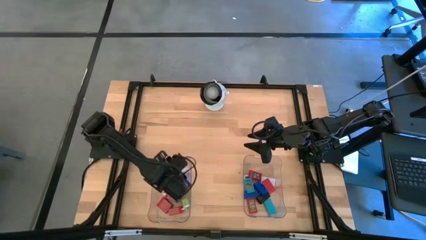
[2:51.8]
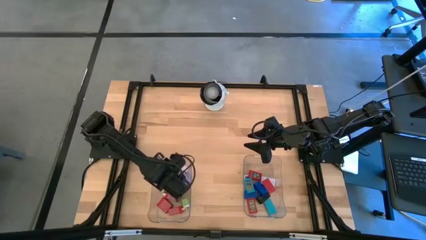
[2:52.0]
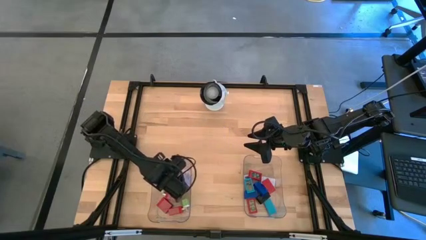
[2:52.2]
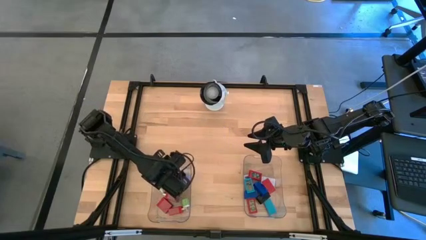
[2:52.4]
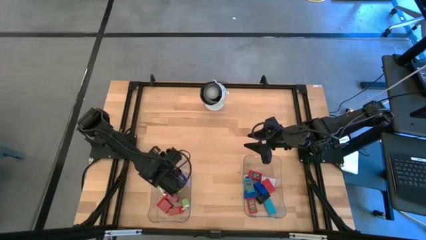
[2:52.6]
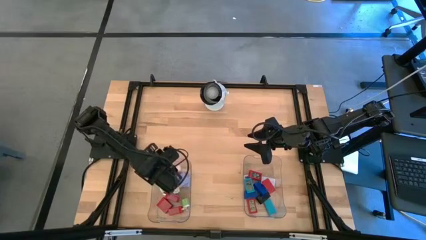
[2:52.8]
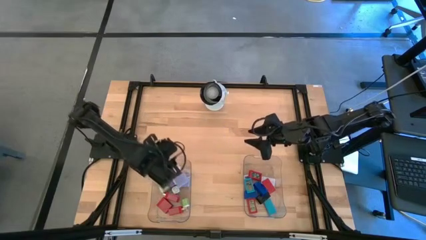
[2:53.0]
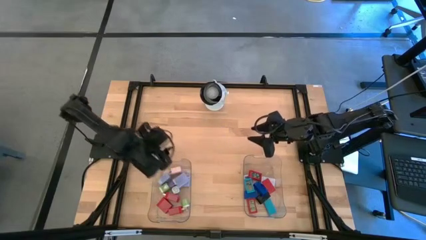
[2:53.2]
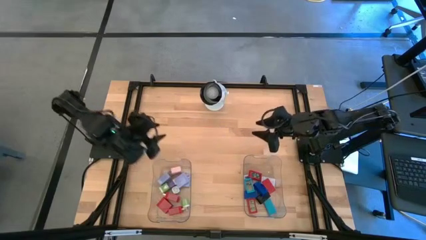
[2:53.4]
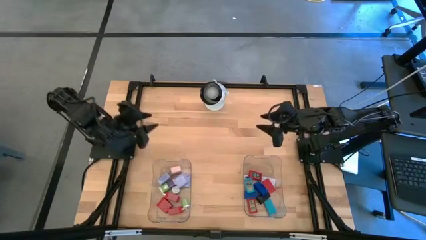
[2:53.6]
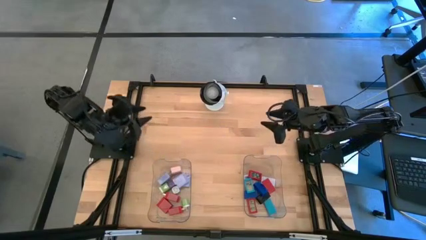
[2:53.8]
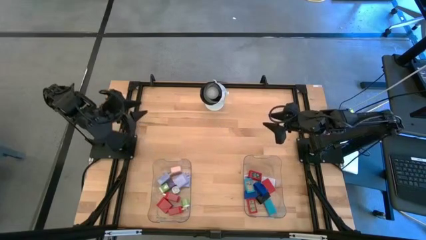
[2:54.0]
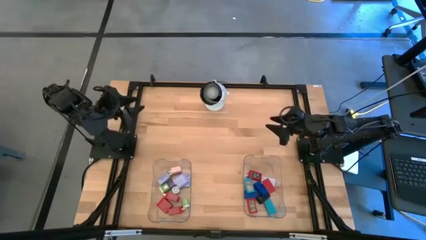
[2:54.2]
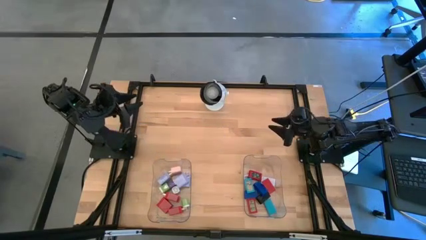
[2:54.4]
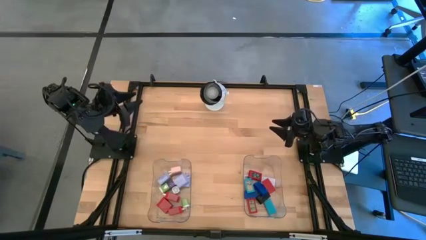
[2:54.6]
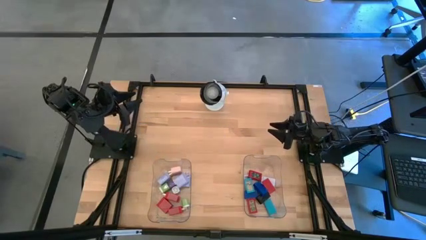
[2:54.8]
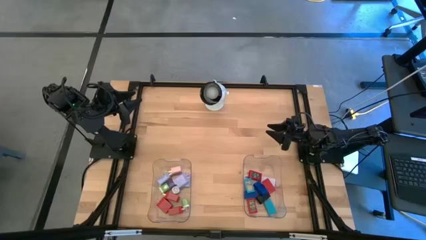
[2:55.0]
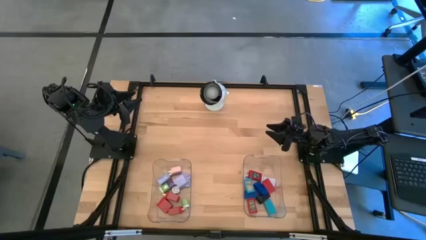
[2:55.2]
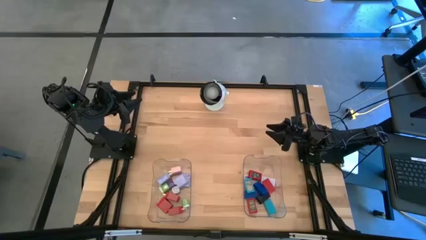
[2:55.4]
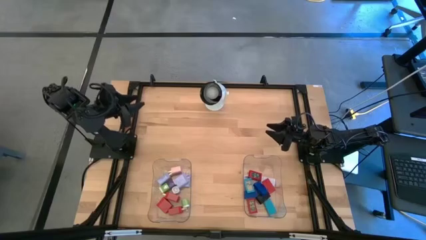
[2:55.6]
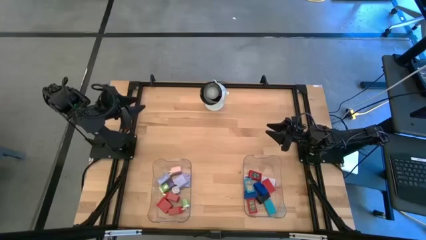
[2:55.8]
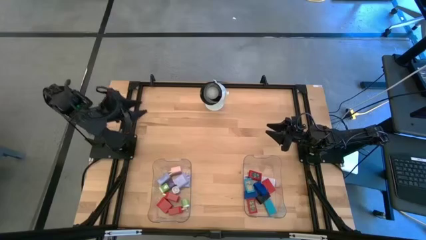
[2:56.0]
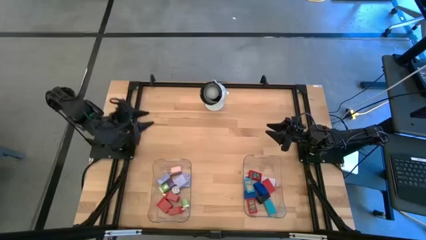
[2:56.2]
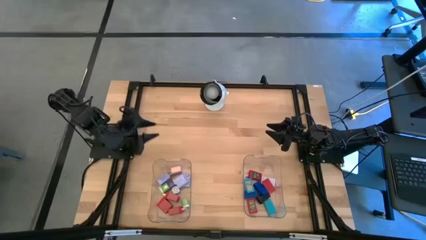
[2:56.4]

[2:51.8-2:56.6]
Task: Pick & Place Office items
Return to Home Position

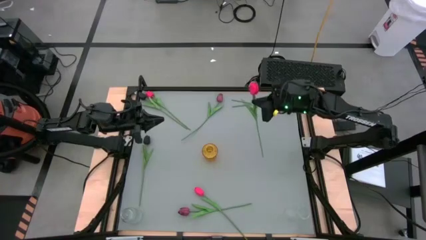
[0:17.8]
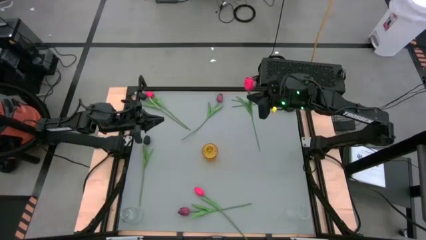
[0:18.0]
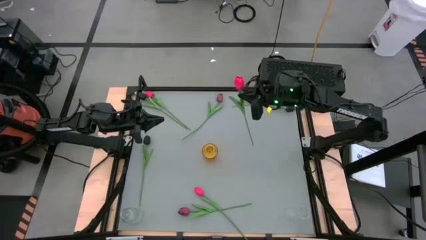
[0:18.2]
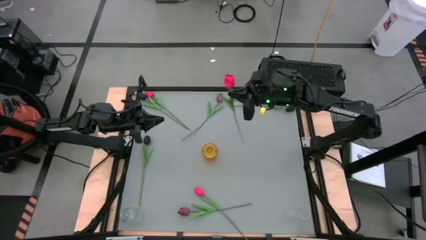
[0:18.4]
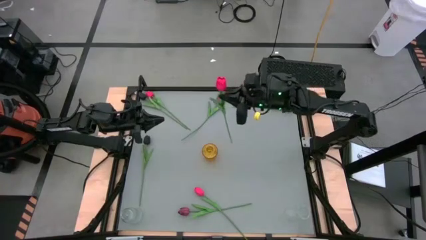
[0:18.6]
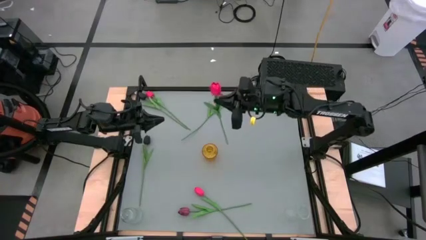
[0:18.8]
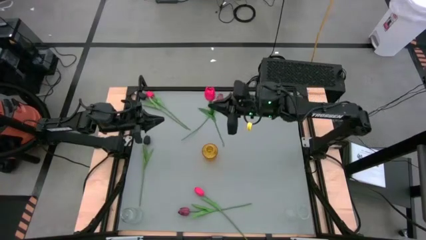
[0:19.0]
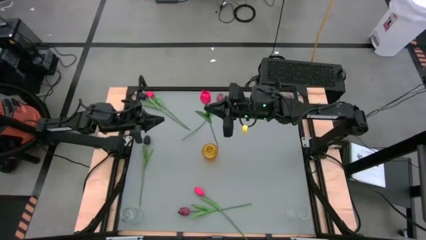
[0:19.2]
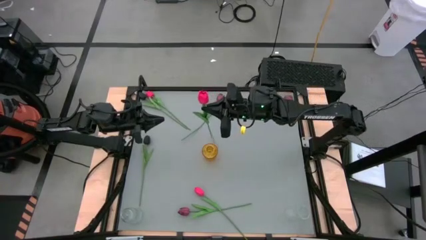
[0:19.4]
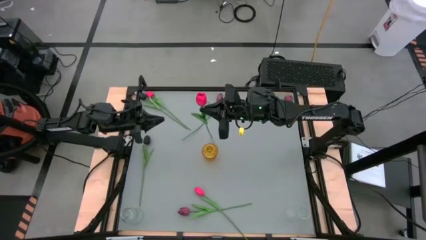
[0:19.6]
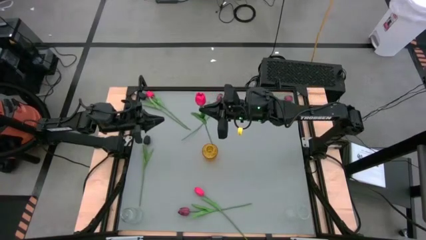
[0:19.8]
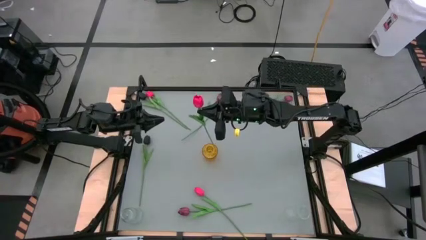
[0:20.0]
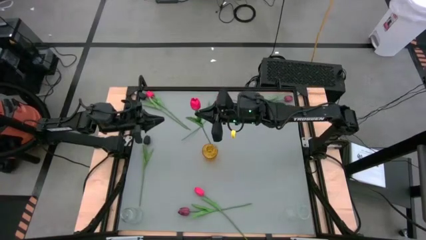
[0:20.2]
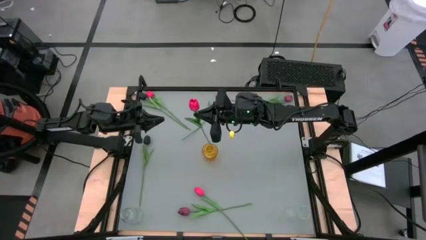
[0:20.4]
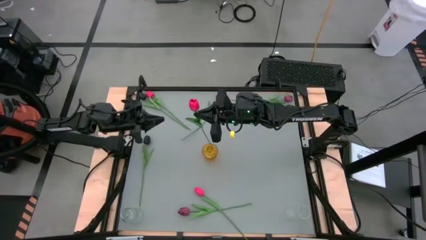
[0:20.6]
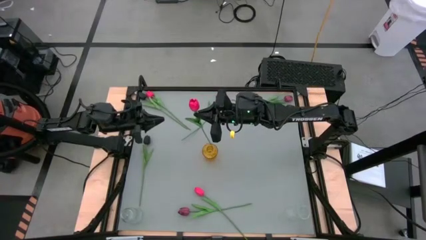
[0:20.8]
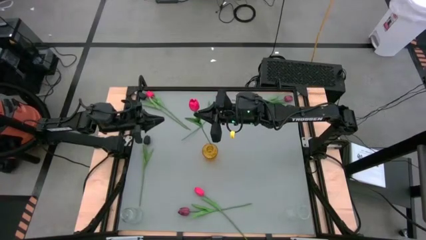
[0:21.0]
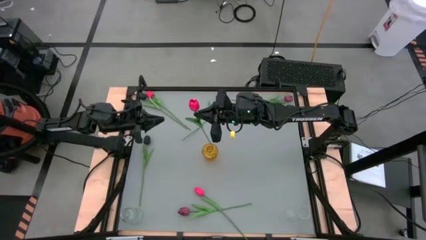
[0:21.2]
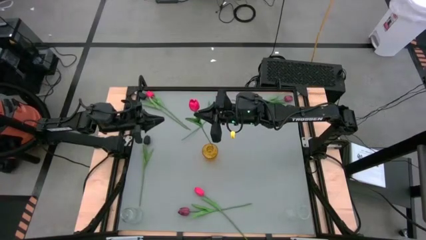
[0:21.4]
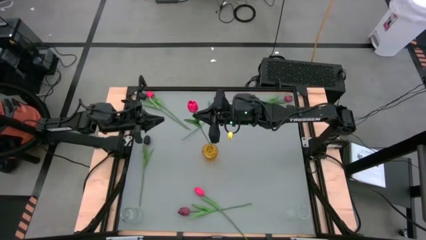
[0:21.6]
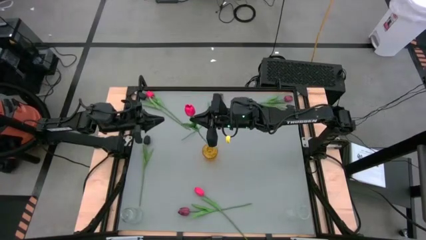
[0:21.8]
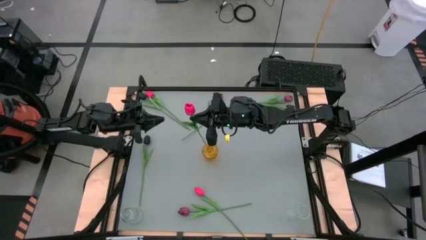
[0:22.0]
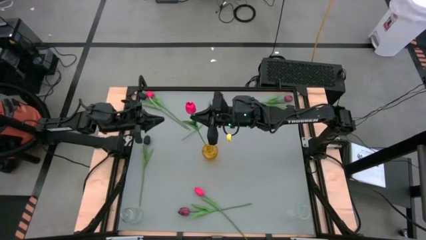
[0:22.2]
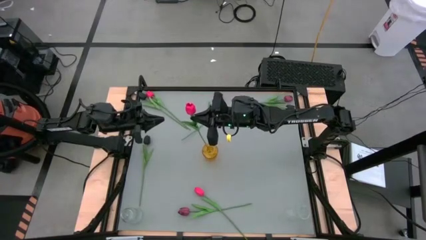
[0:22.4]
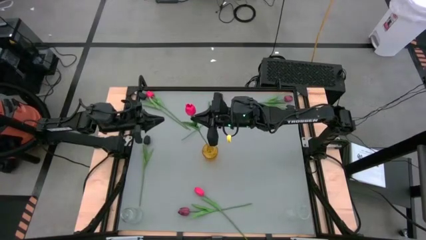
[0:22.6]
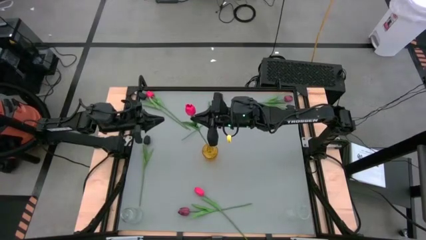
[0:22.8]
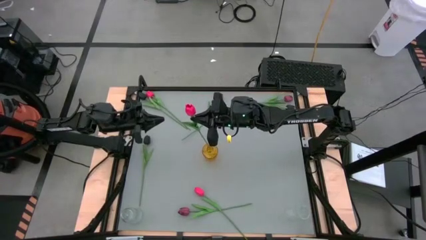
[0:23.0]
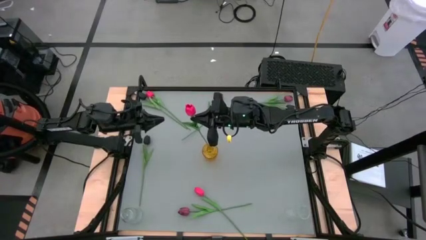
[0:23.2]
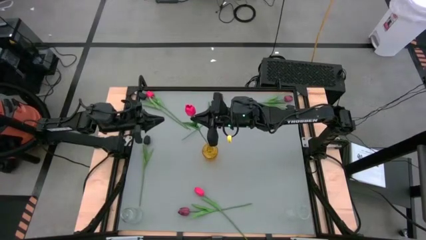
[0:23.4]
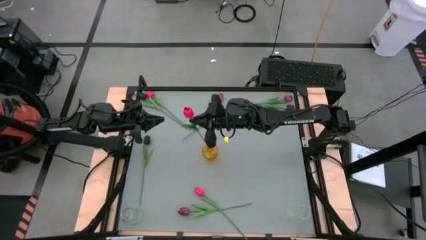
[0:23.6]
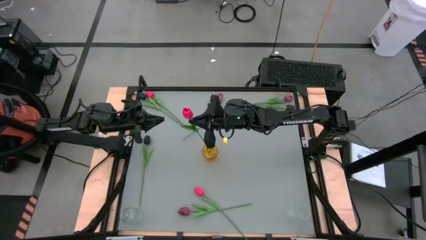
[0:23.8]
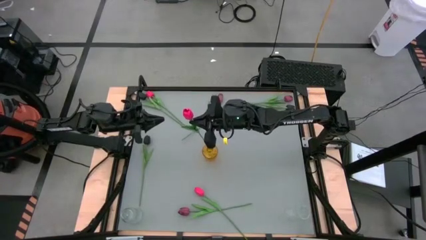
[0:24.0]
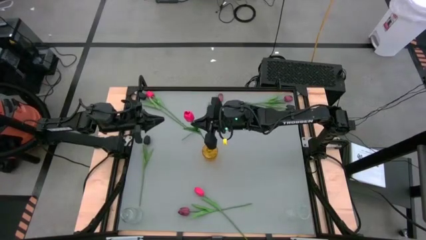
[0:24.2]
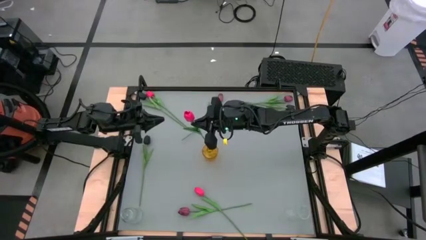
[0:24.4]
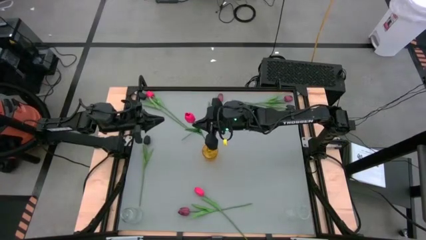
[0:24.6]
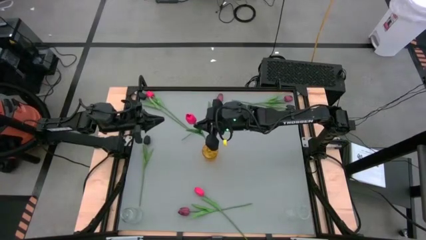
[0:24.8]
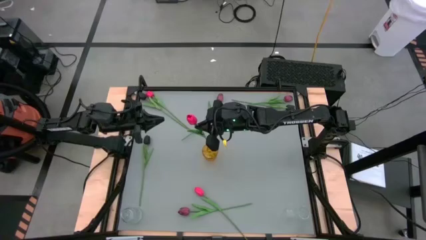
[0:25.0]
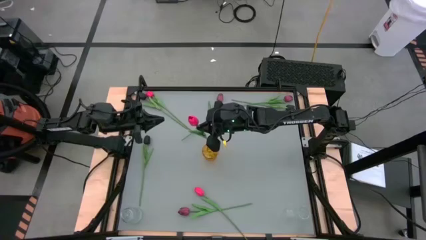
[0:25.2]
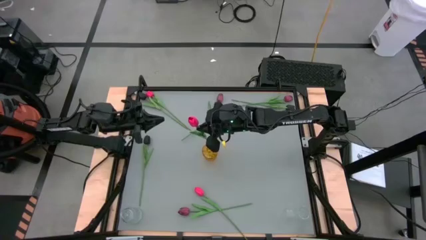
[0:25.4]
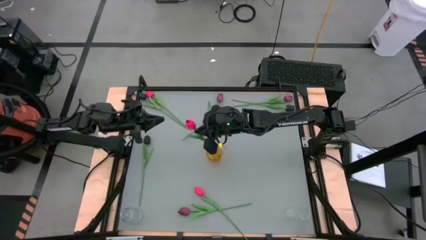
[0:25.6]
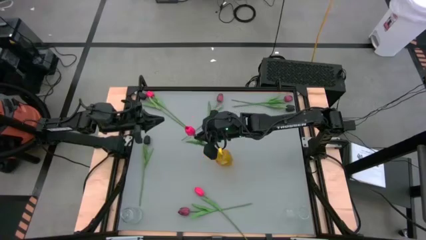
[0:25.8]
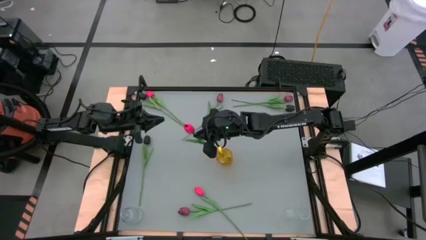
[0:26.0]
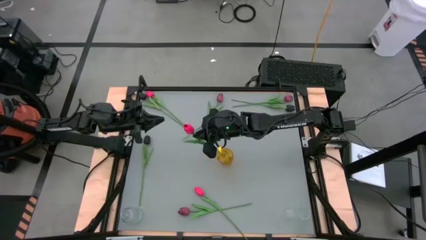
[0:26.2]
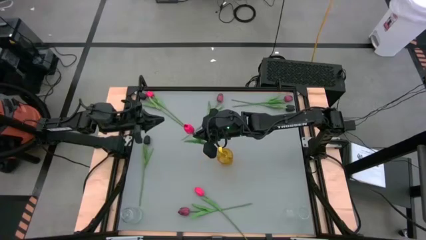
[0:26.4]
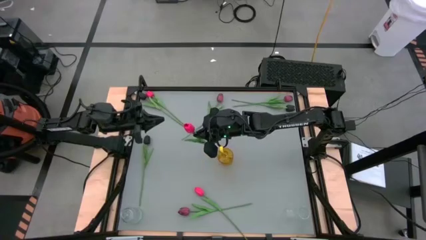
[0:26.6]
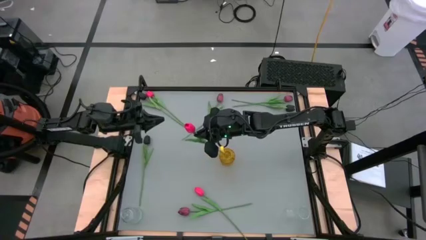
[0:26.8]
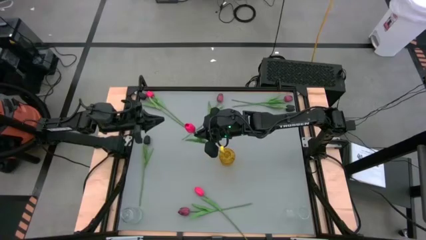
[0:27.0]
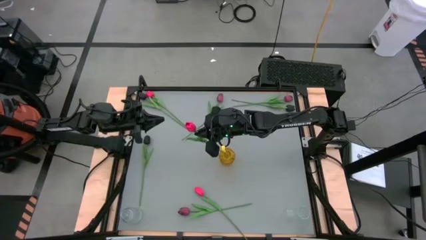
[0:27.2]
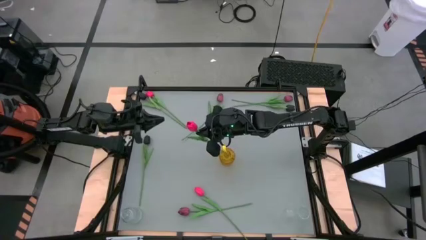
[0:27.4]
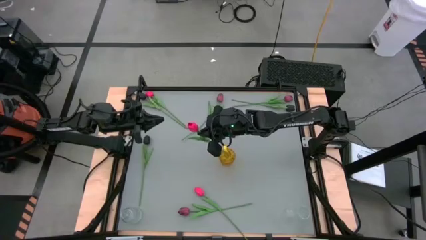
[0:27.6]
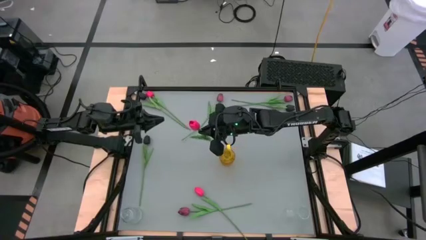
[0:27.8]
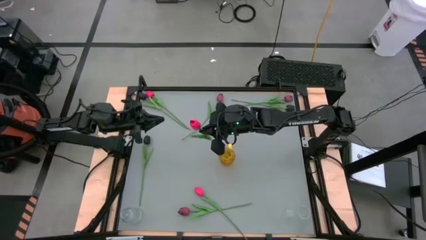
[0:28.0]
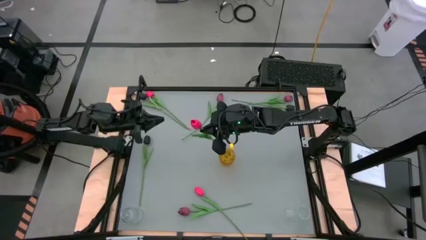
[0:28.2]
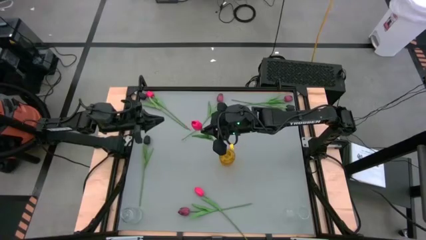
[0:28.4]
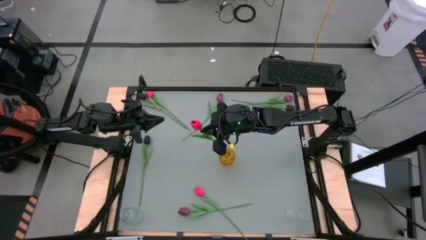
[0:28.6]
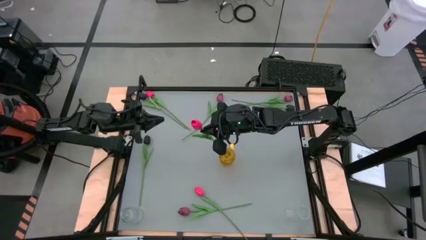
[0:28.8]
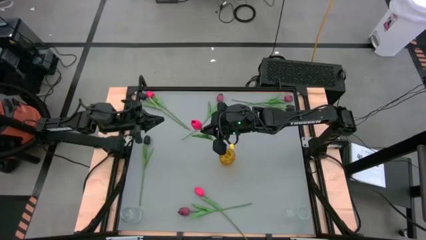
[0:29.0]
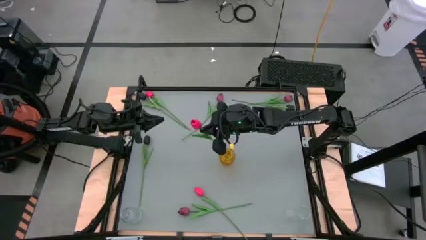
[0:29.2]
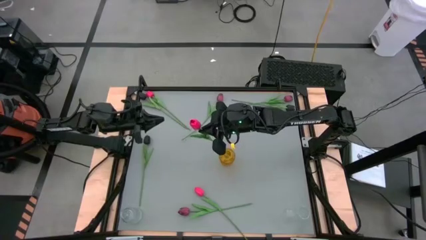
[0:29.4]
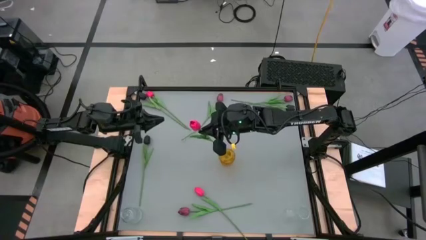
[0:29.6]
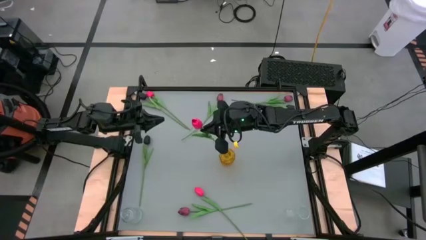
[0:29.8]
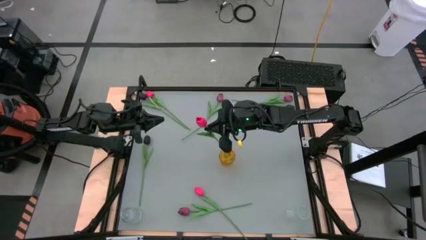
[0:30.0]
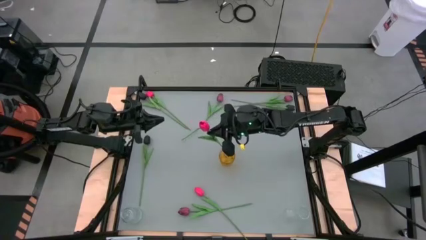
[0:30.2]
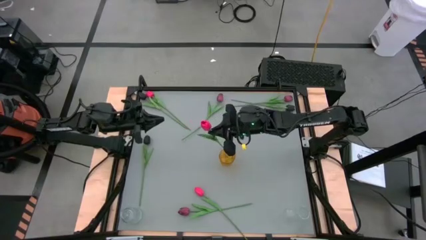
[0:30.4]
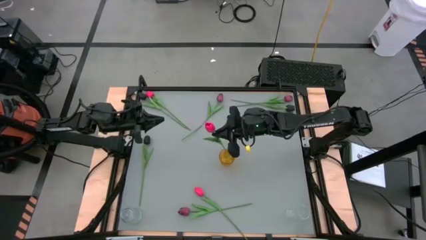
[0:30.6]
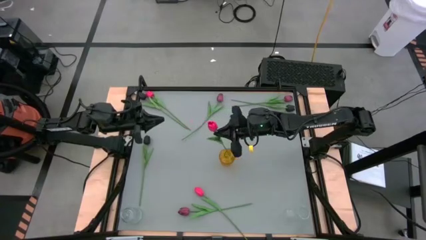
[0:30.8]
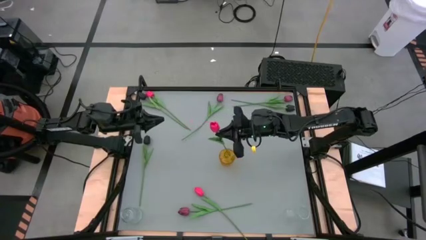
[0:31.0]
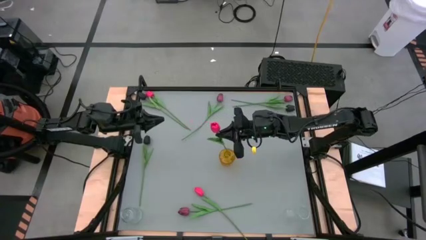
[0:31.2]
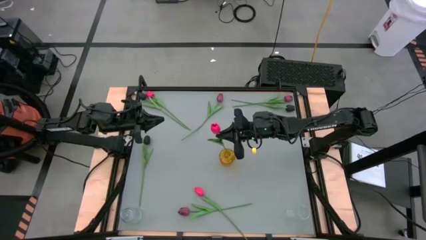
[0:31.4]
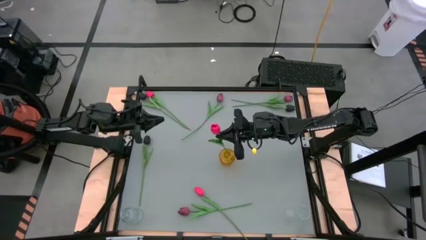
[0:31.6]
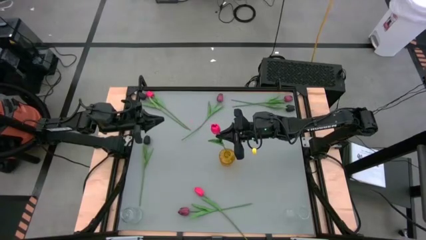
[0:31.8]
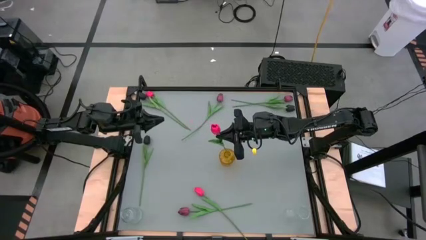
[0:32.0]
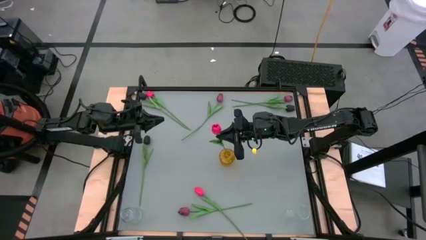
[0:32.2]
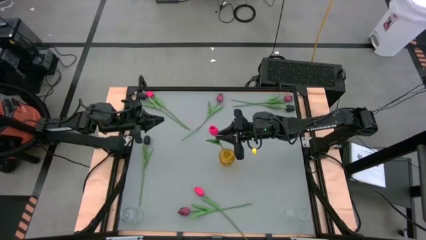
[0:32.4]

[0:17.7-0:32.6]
Task: Sort flowers into vase by color
Put the middle right pink flower into the yellow vase
